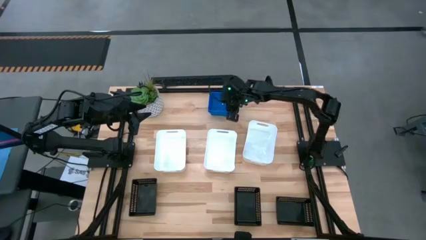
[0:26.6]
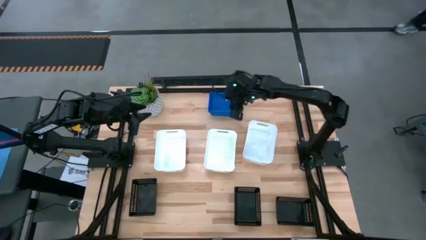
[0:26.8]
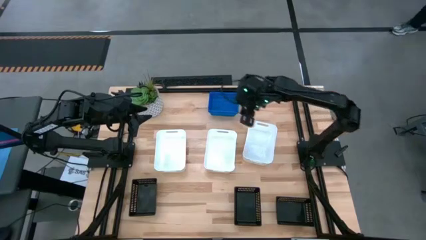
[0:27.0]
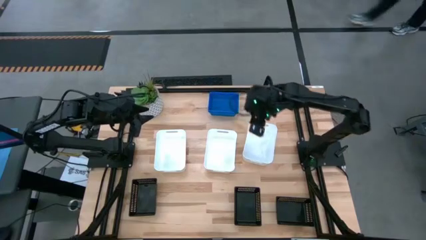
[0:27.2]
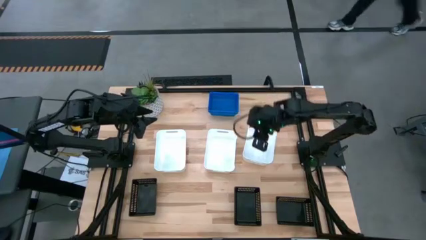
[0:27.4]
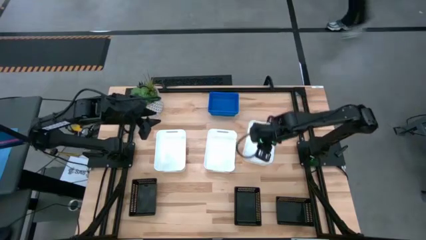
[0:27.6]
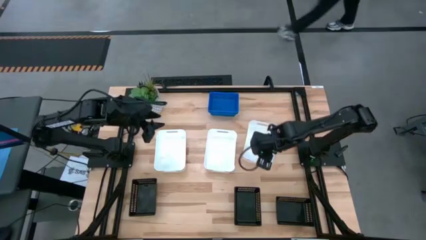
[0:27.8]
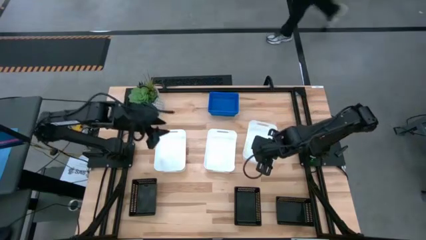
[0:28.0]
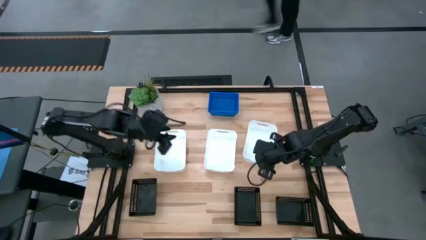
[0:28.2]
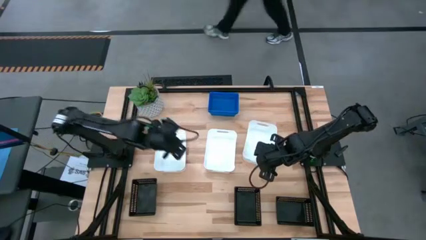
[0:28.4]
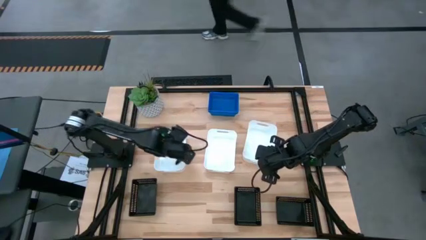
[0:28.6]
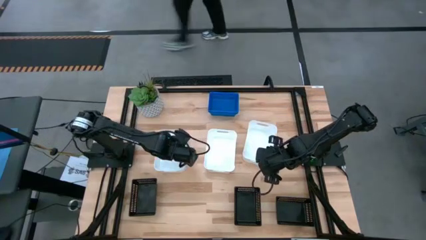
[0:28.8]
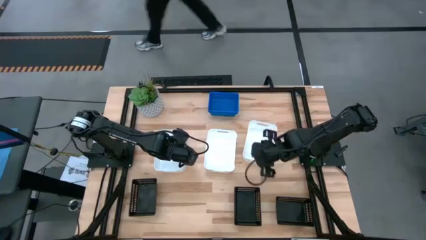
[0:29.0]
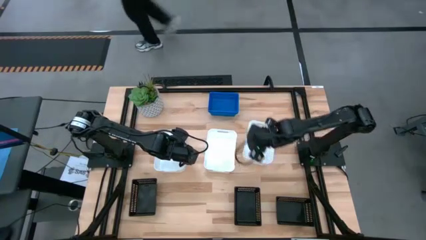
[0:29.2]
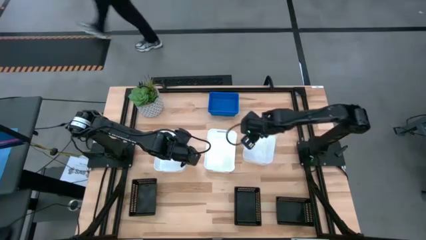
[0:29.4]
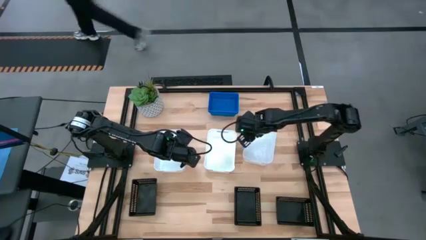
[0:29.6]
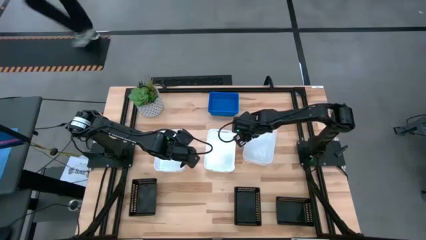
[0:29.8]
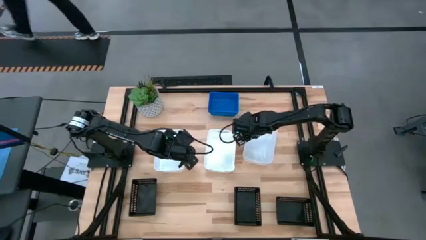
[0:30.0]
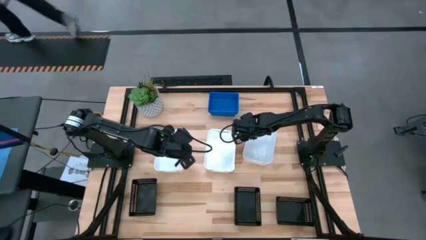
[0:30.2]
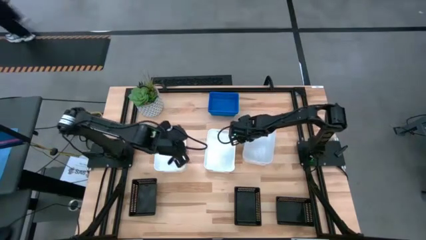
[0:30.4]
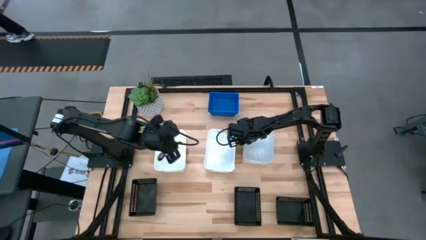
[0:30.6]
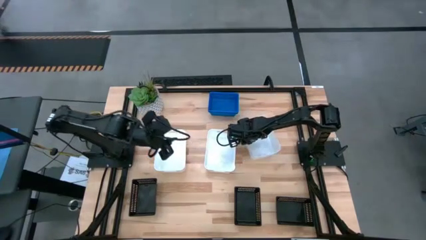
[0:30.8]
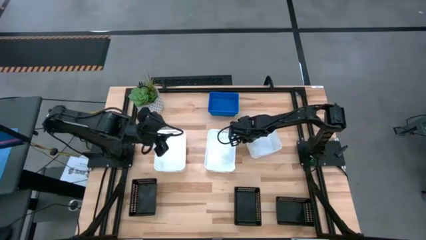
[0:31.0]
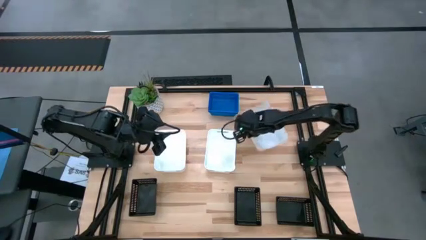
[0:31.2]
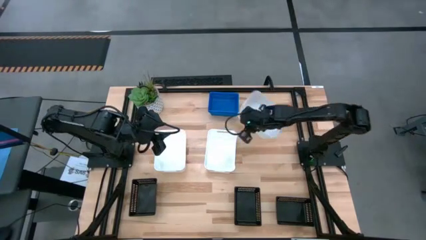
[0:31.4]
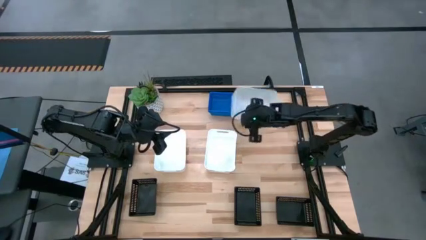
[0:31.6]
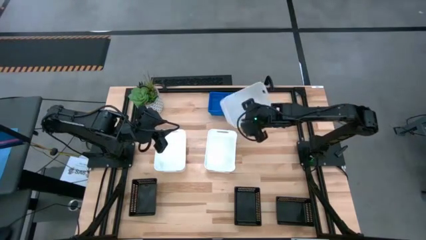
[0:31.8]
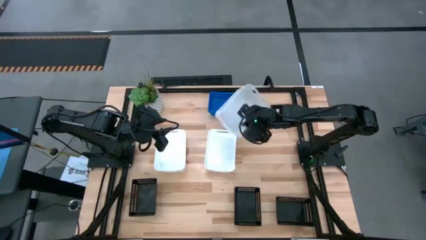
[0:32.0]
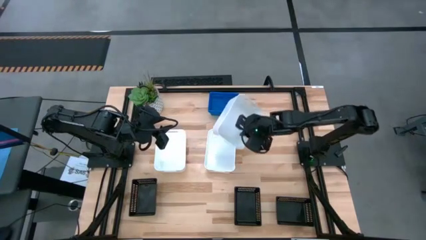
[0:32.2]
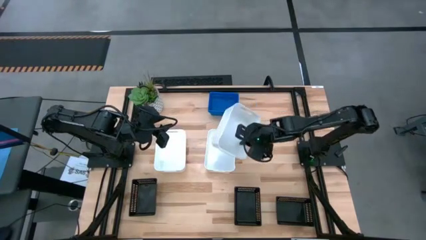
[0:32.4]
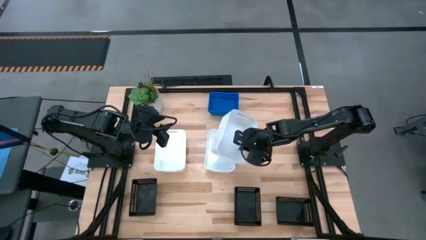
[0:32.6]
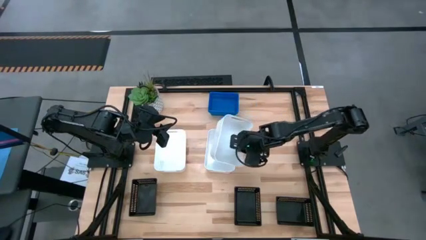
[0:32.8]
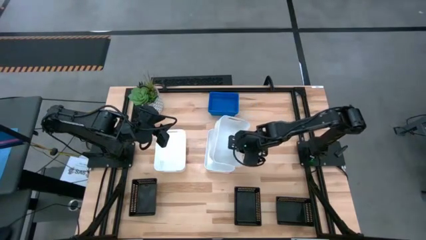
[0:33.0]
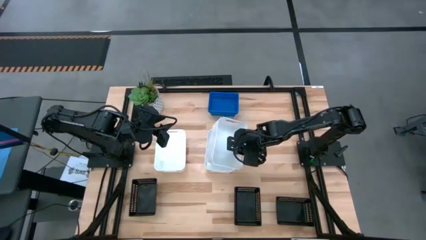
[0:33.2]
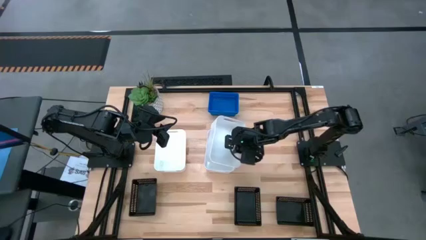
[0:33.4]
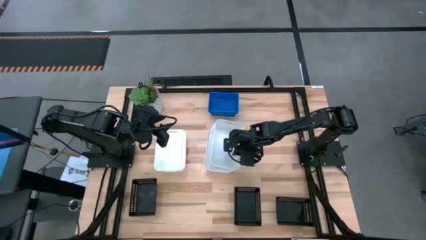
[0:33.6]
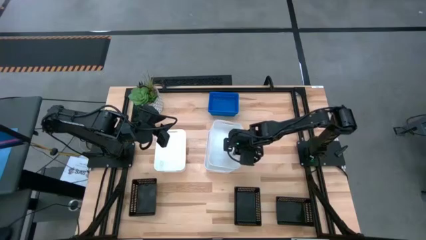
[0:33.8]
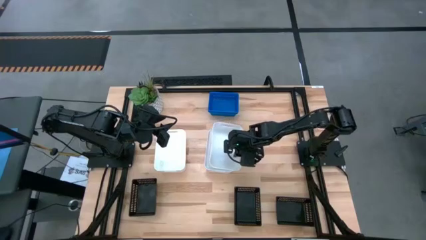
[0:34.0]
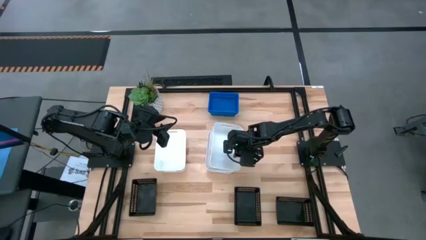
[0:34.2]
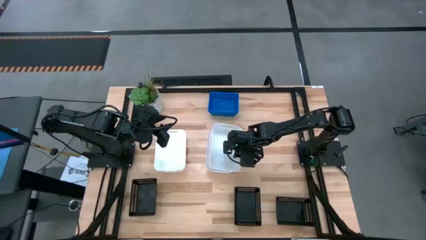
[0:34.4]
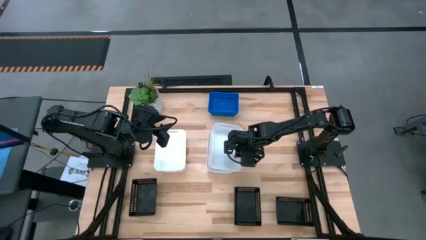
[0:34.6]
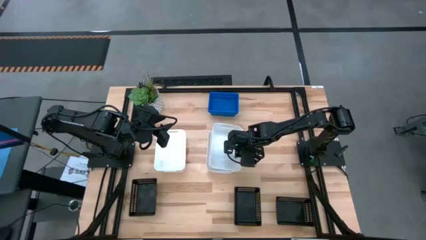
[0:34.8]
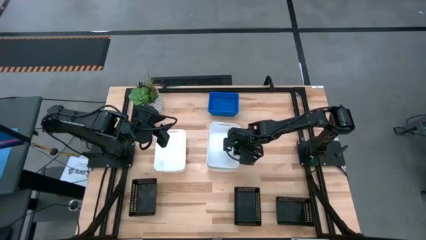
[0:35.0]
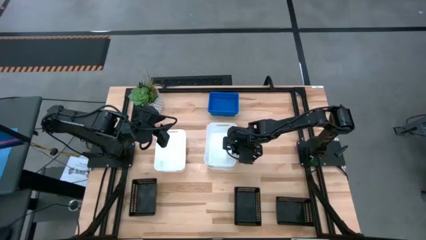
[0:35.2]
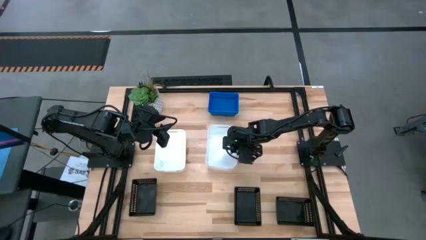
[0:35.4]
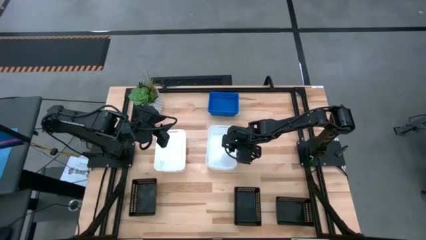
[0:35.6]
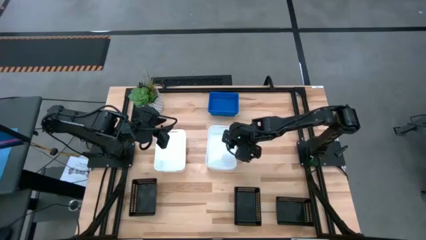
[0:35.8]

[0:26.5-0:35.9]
Stack the right white bin on the right white bin

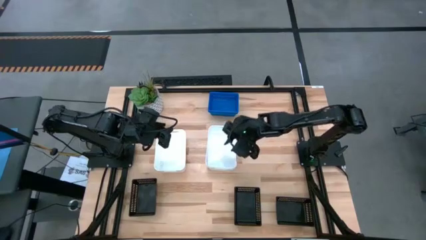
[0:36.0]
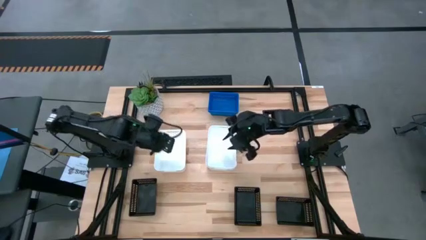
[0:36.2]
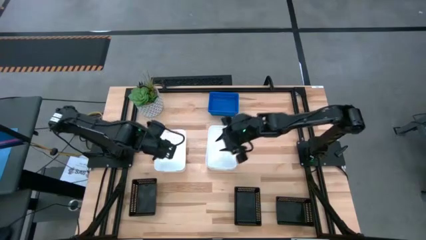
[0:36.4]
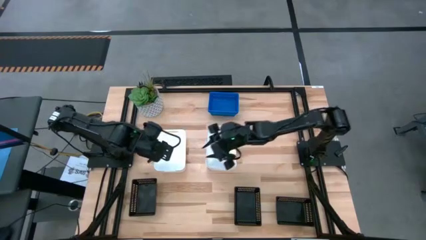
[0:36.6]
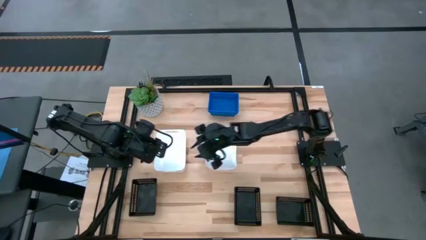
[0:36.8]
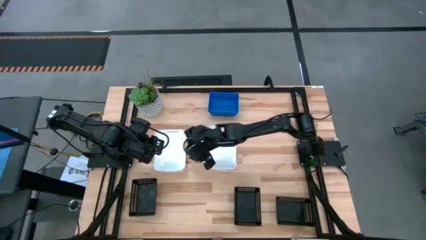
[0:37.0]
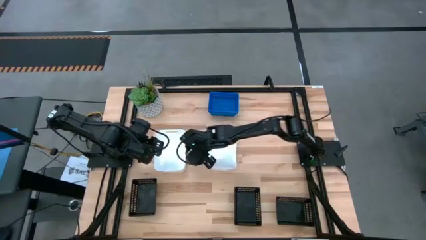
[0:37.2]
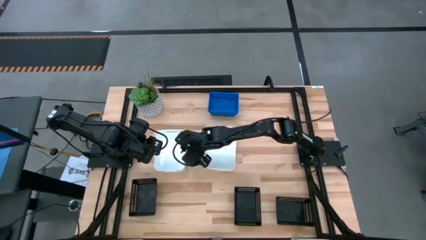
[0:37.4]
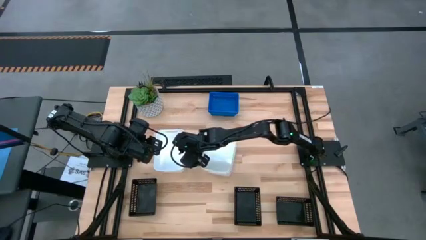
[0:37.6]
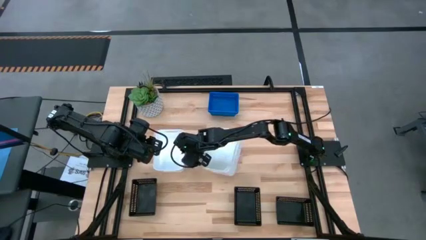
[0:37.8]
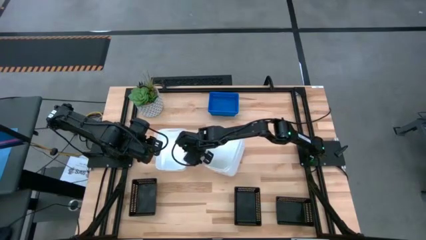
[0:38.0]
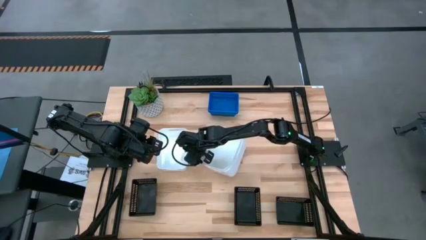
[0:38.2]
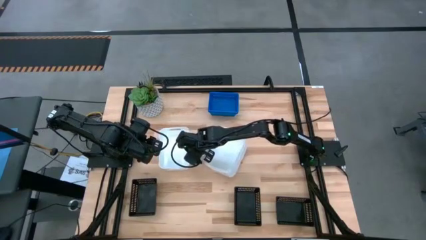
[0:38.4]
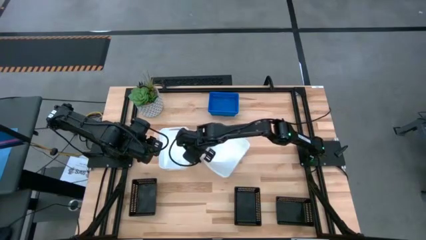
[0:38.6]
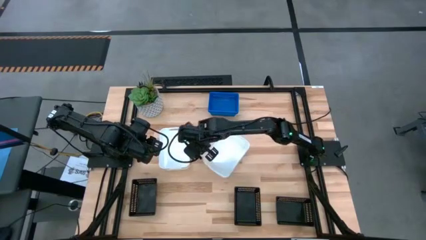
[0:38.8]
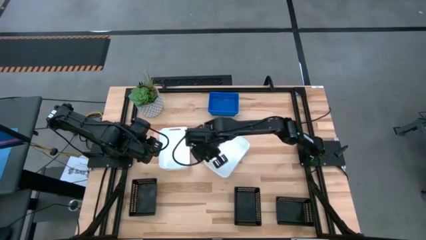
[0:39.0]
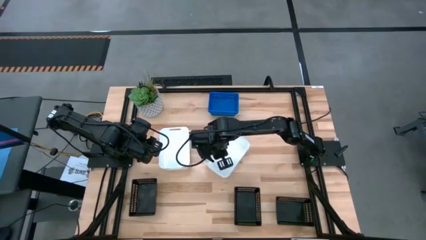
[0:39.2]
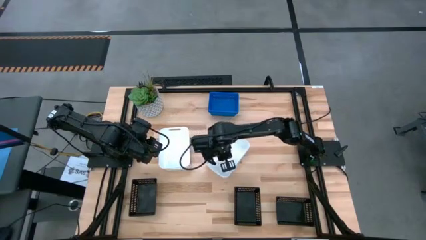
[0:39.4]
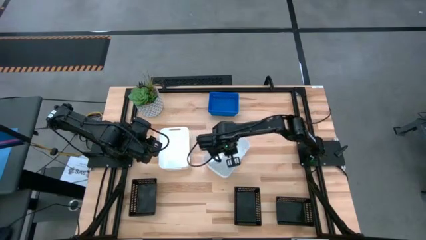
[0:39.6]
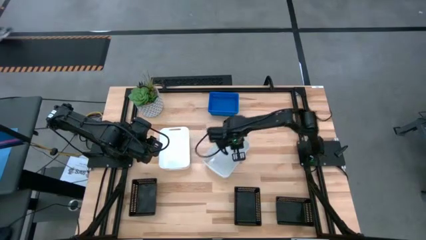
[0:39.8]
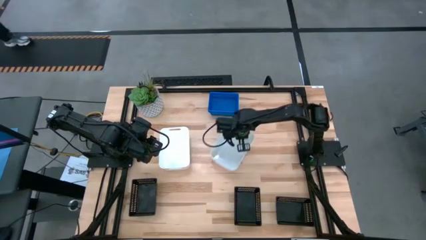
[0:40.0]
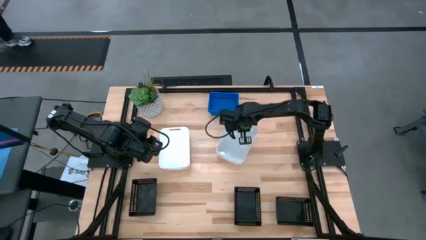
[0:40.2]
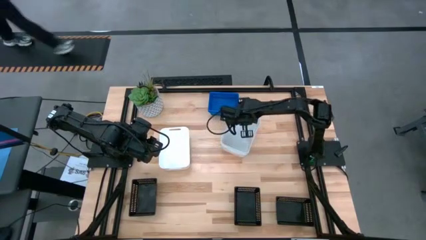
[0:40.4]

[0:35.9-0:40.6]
Adjust the stacked white bins

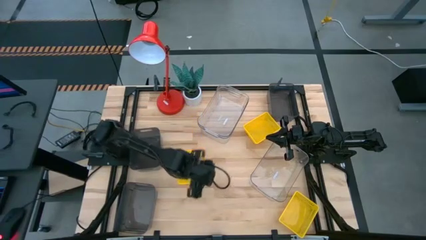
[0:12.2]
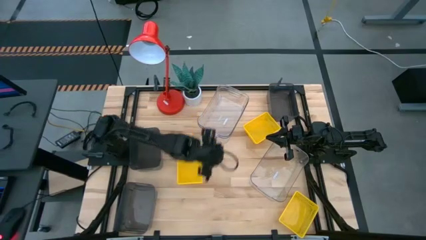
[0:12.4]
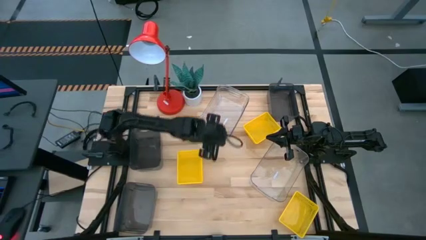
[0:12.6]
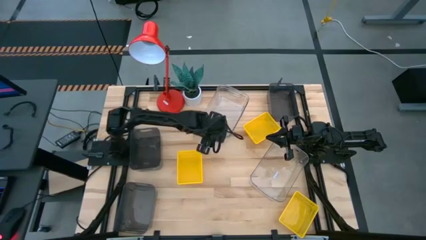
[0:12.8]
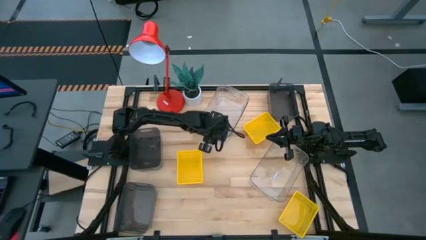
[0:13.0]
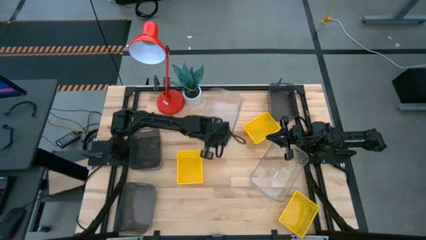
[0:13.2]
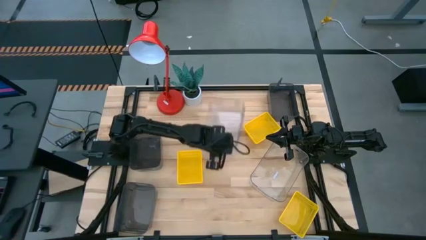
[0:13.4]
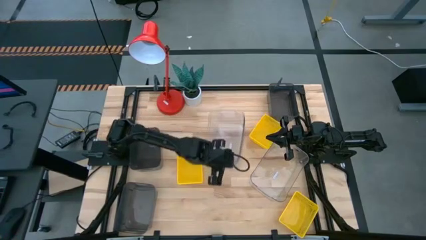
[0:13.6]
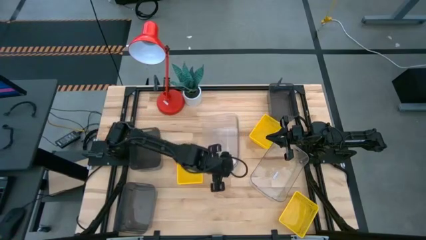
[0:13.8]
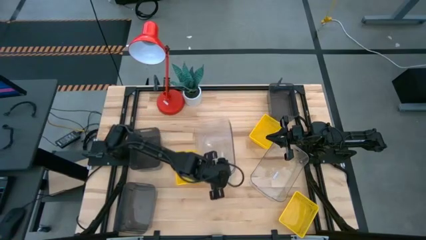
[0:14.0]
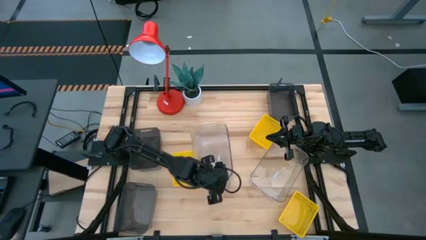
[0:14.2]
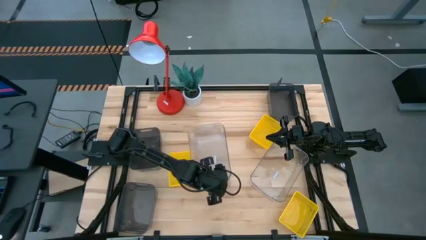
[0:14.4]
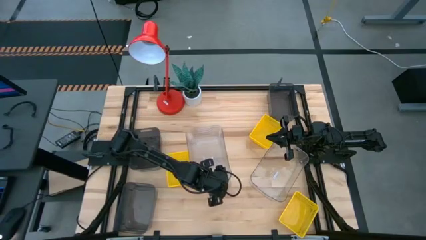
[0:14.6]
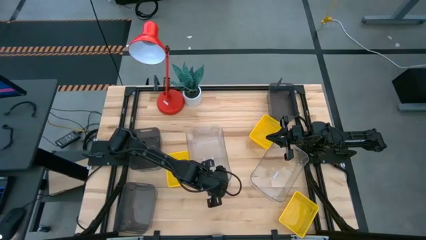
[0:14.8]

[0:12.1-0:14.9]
Move the stacked transparent bins to the center of the table
